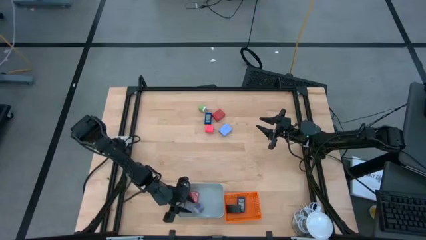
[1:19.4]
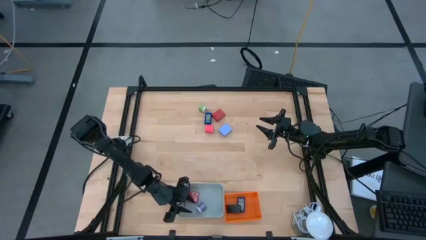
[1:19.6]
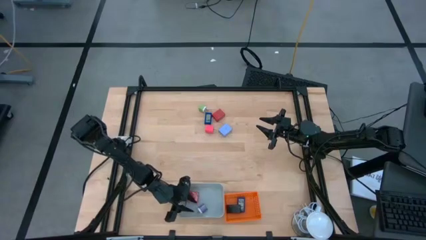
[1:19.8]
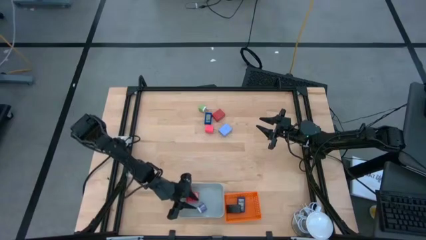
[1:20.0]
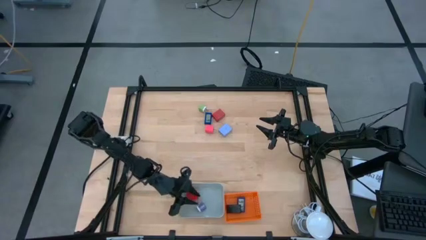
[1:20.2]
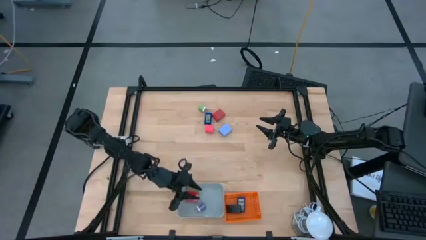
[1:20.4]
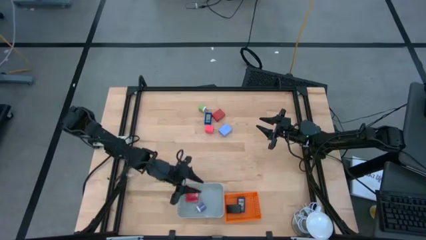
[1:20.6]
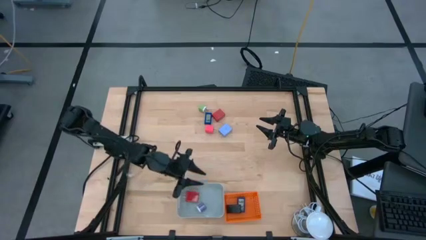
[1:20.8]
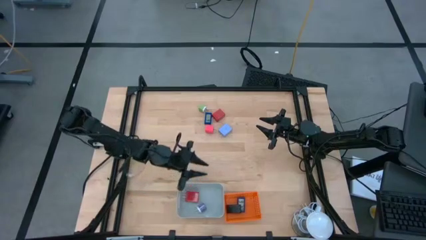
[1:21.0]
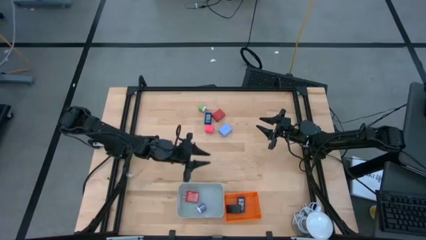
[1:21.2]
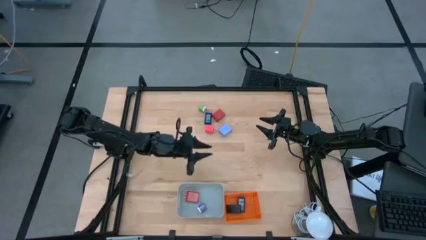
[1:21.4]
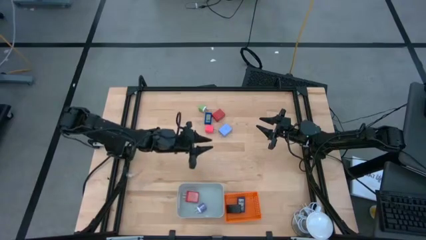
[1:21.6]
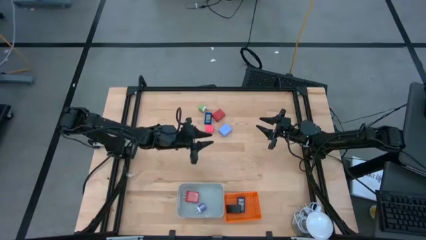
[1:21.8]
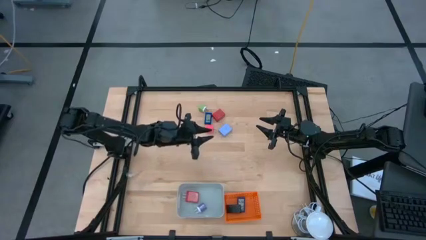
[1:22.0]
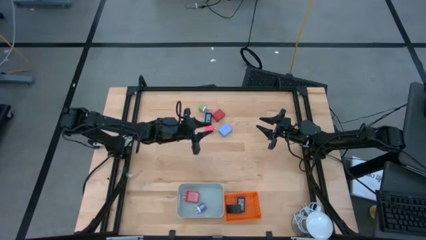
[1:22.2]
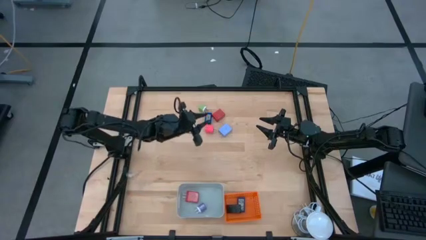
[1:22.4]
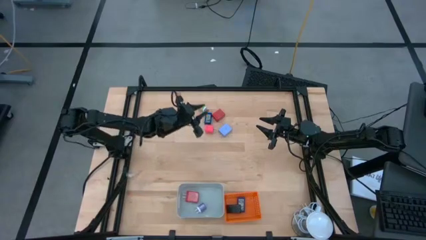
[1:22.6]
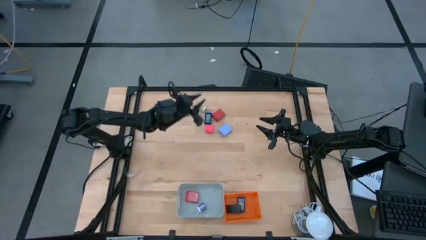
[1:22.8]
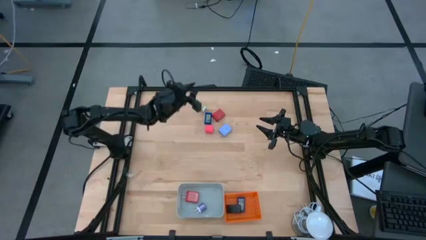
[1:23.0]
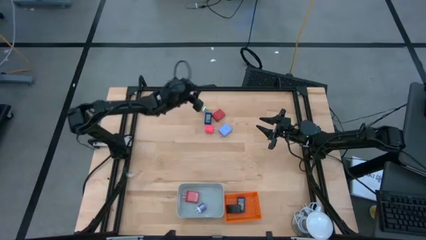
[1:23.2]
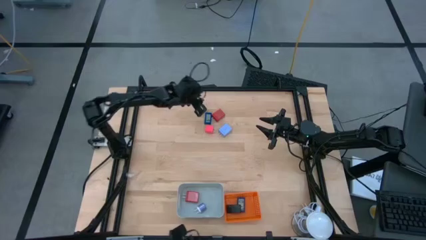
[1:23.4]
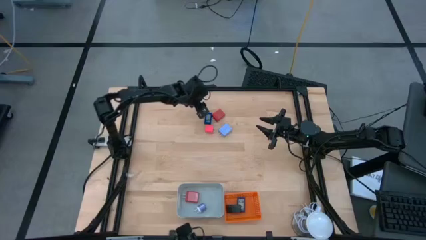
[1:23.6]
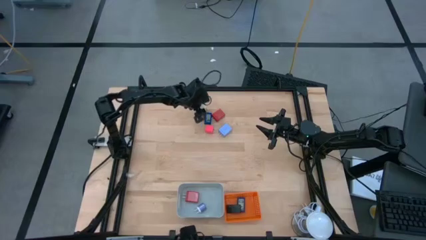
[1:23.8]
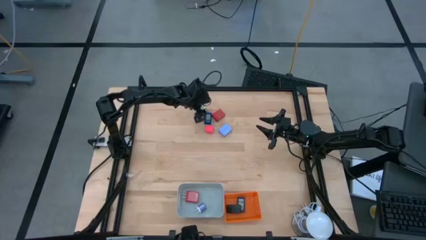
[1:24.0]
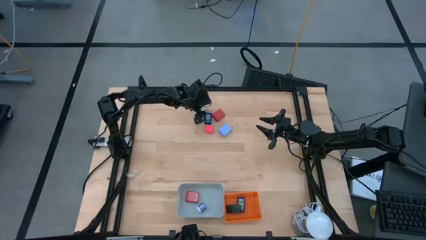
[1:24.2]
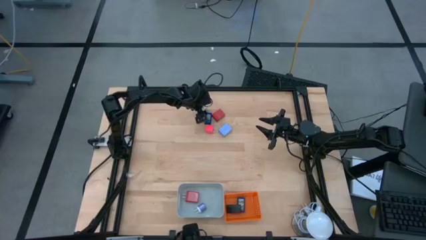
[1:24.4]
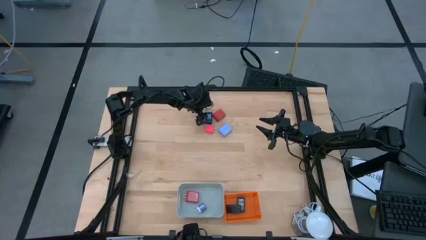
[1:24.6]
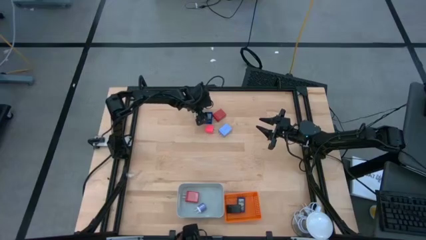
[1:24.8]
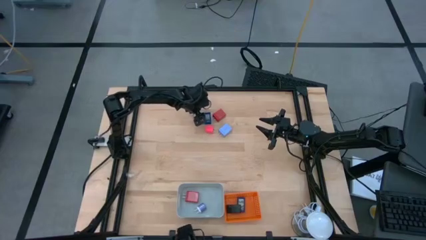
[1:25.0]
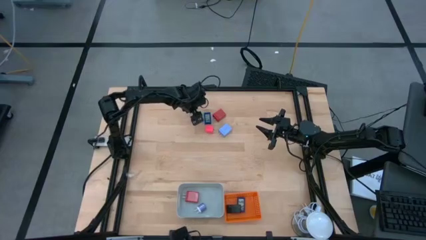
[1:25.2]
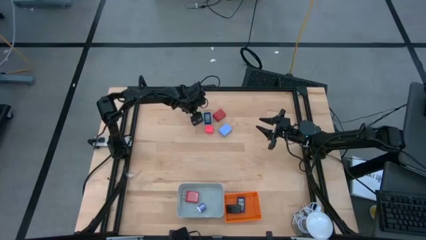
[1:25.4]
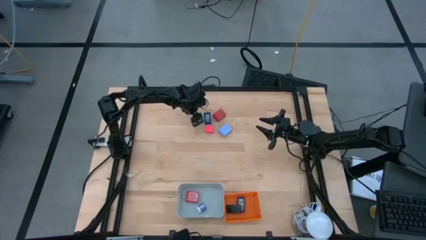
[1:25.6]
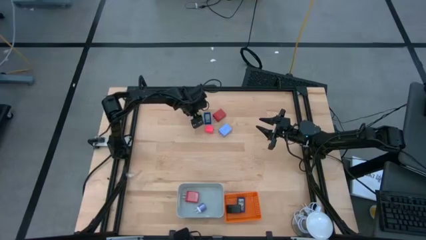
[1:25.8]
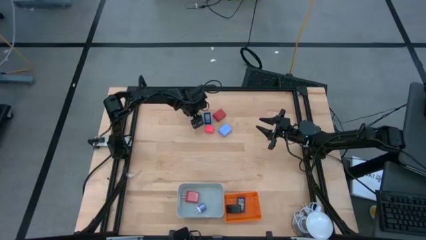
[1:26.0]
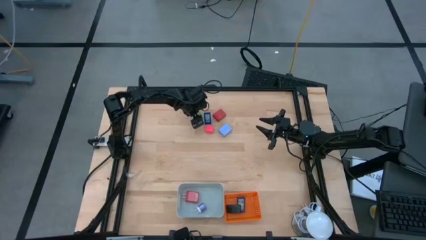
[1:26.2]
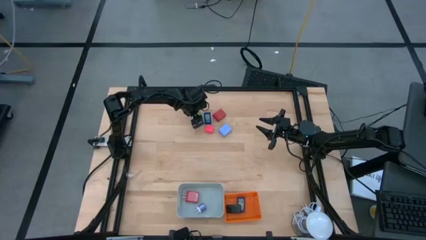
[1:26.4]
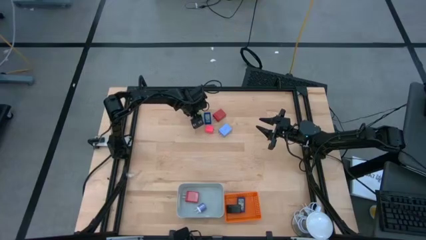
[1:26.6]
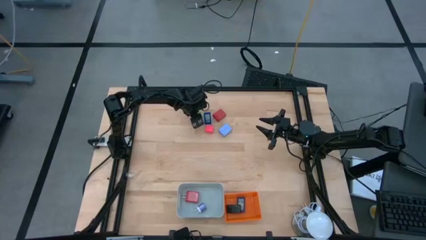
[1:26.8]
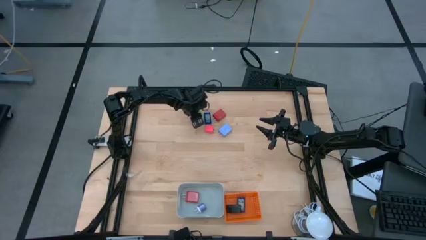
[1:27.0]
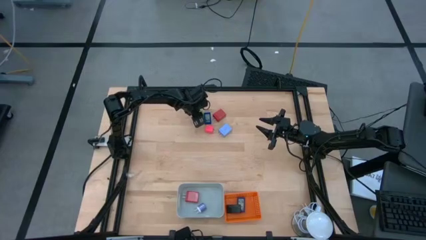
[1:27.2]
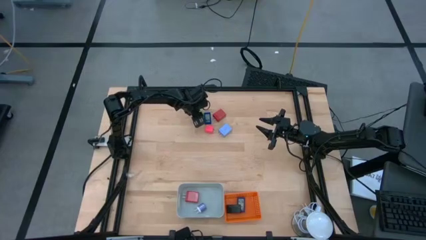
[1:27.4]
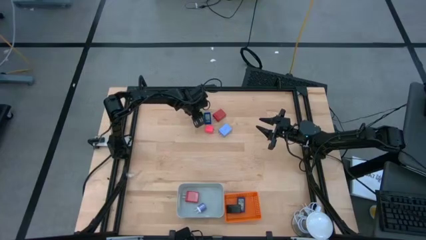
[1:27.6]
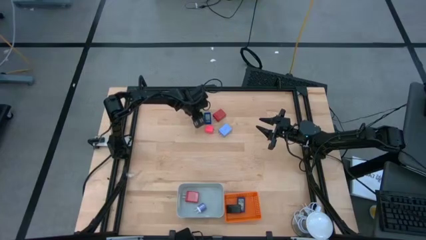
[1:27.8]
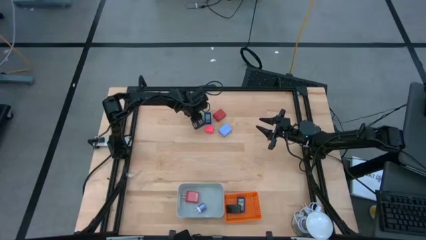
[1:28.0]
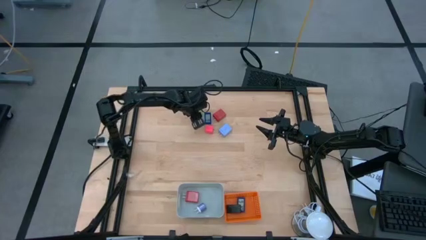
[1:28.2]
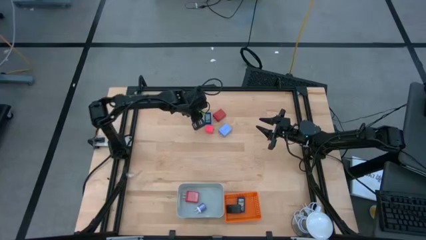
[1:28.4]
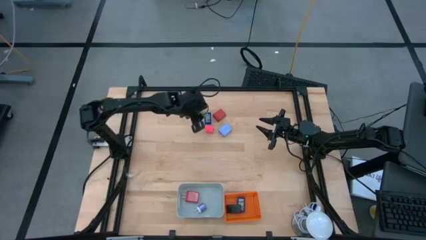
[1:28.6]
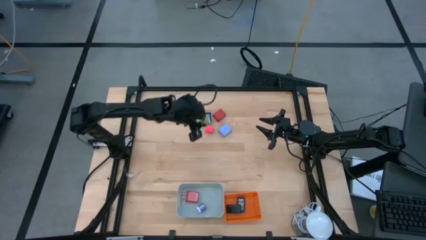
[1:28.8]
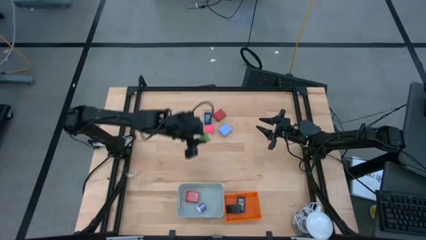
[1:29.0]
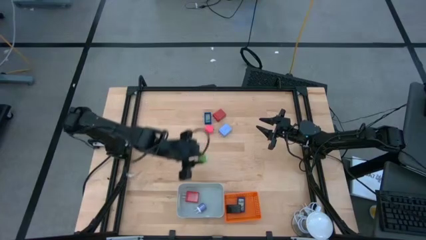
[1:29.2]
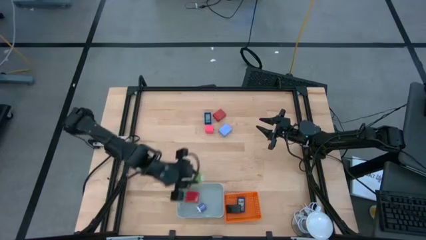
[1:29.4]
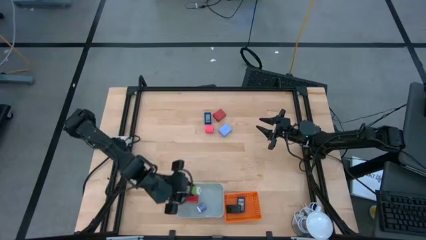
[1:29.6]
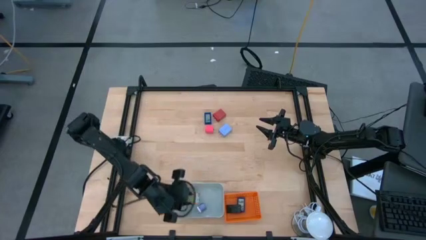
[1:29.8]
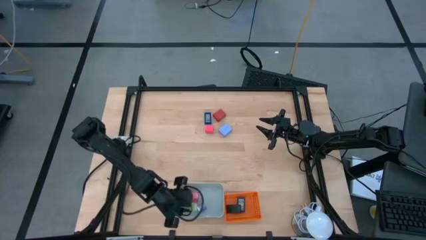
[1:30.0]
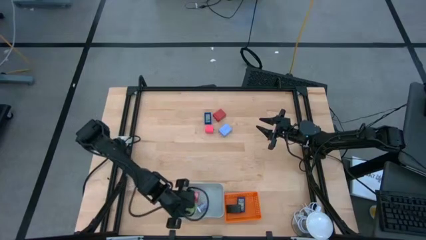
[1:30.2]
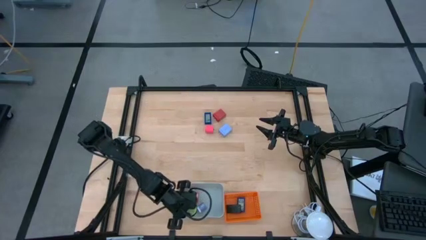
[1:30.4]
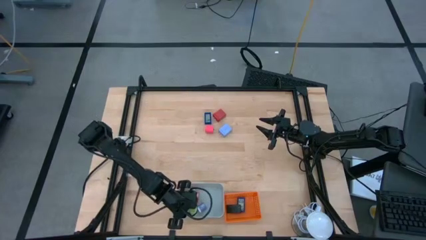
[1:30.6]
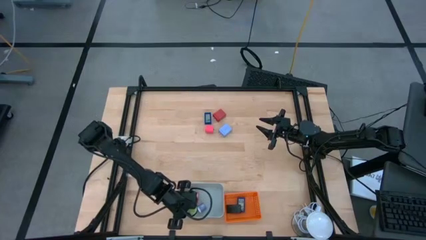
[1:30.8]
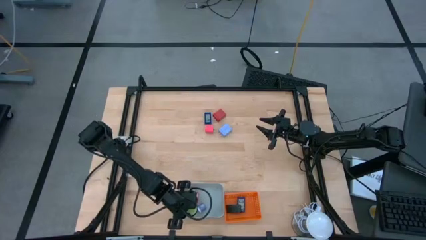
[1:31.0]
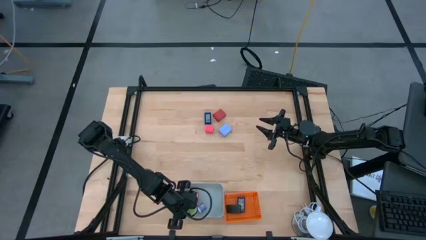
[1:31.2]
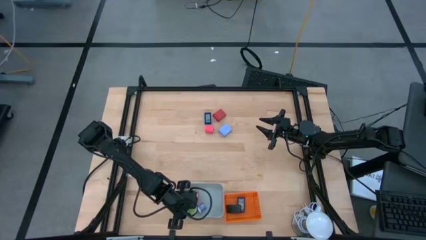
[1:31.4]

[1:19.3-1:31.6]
Task: Pick & Place Office items
Put the white green charger adapter into the gray bin
